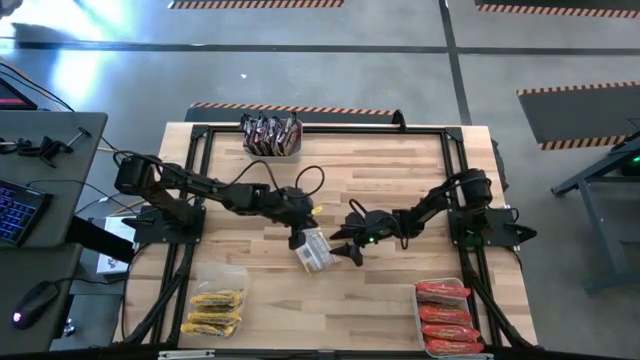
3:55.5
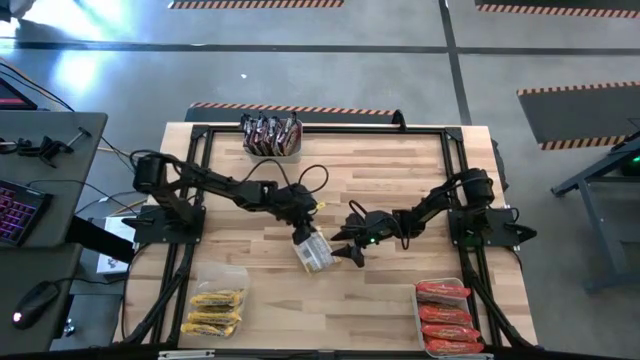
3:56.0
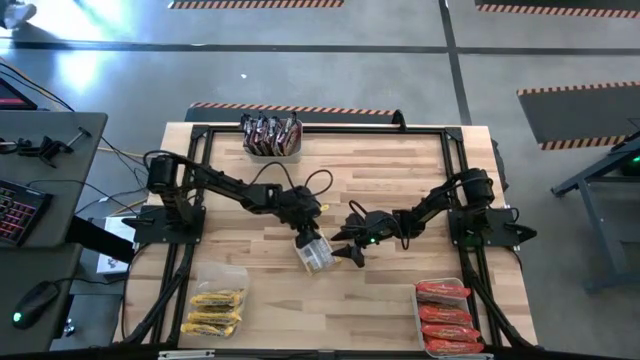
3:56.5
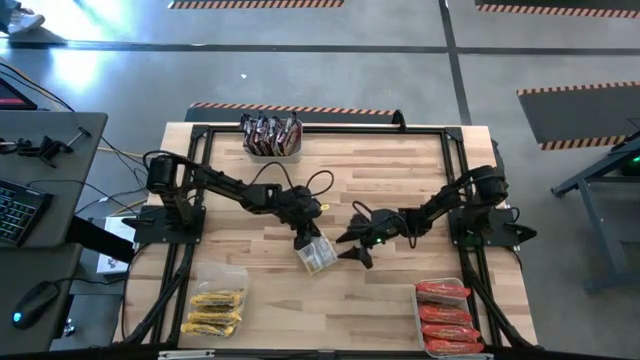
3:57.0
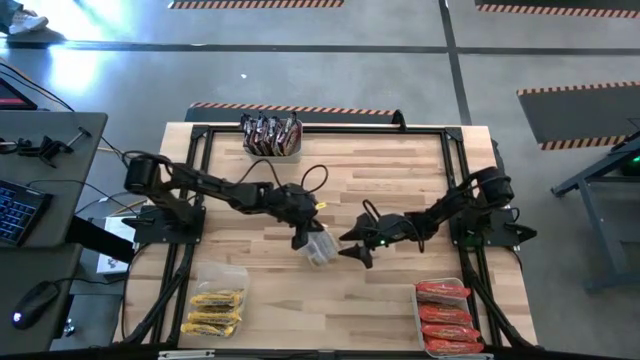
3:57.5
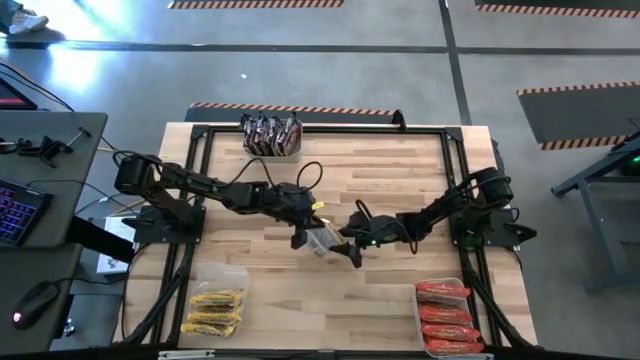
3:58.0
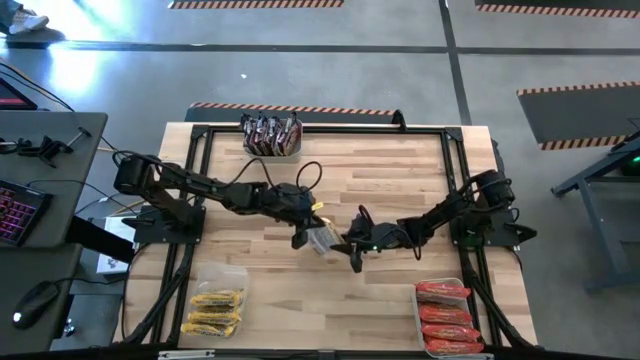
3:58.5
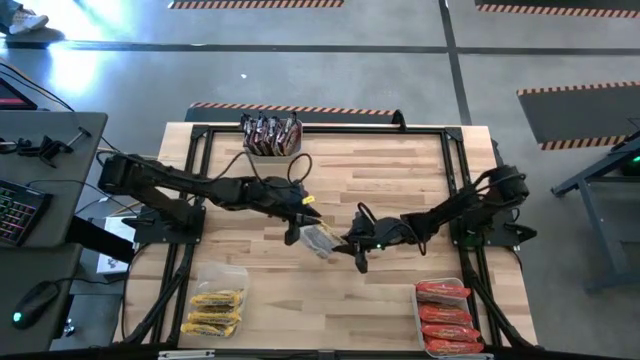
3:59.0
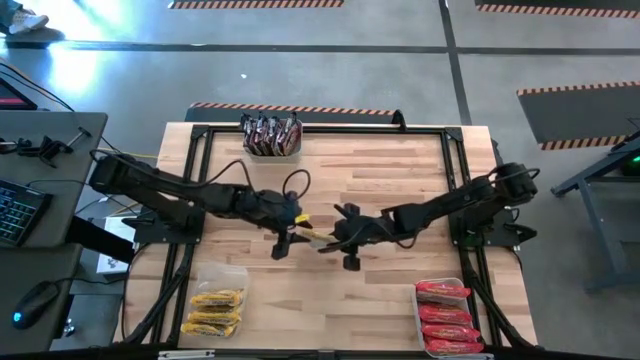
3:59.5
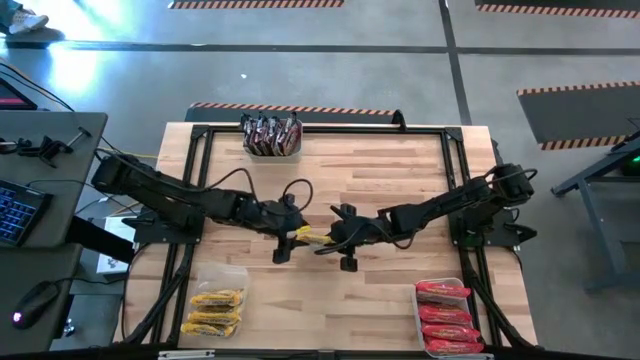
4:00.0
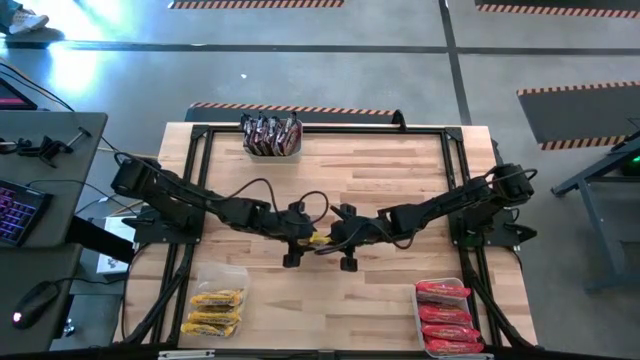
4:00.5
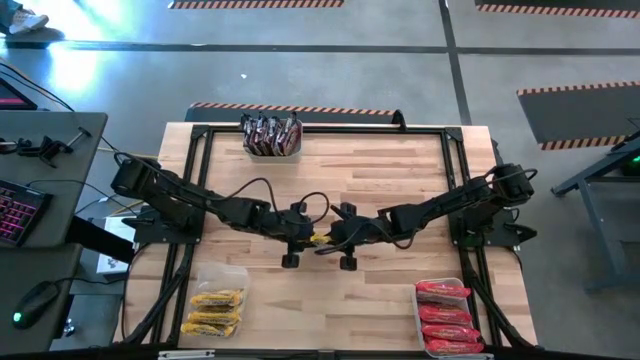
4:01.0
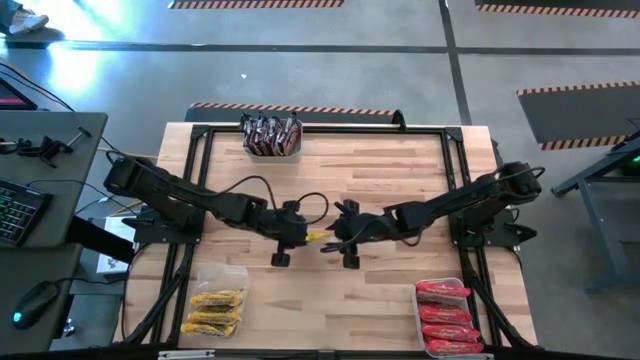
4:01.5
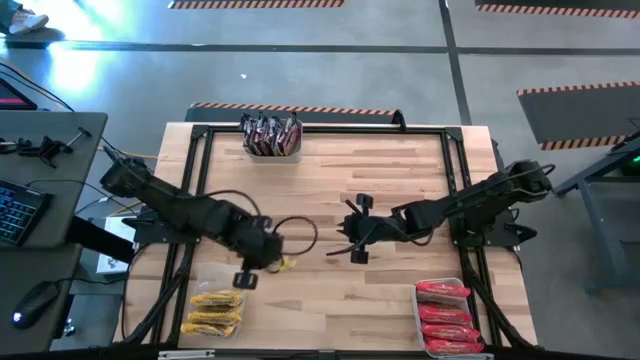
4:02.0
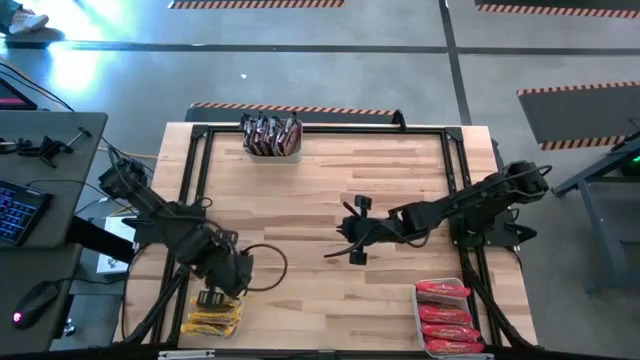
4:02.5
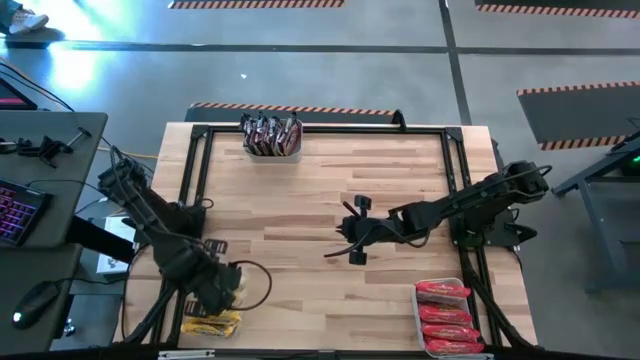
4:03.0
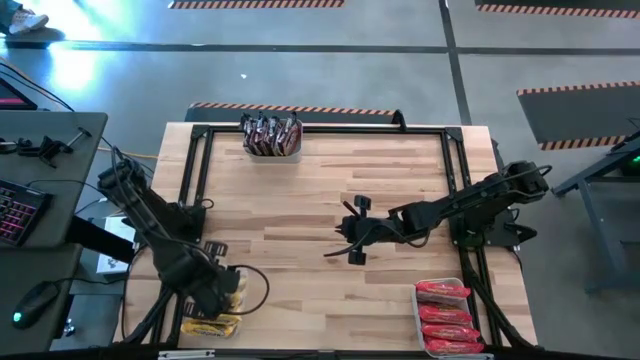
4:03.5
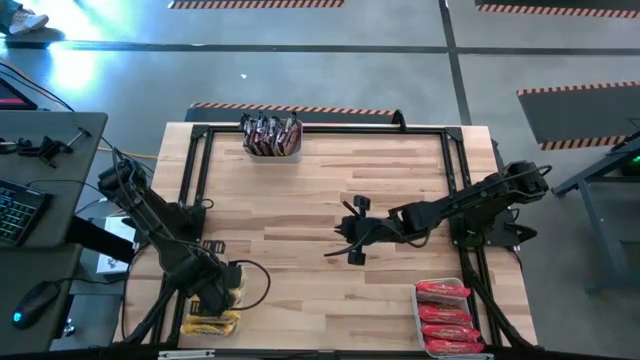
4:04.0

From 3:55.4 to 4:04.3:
Task: Sort Maruchan noodles
Put the yellow noodle pack into the transparent bin

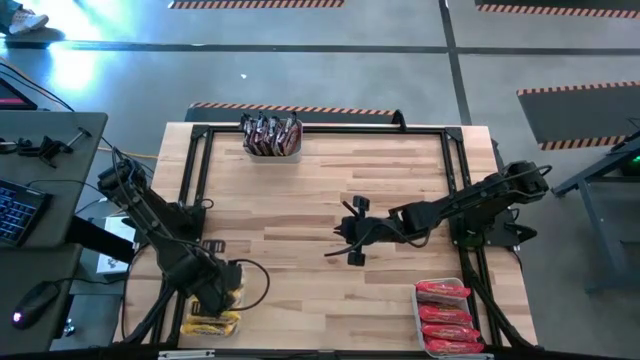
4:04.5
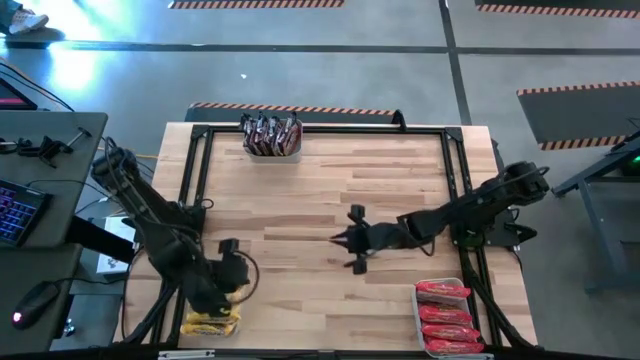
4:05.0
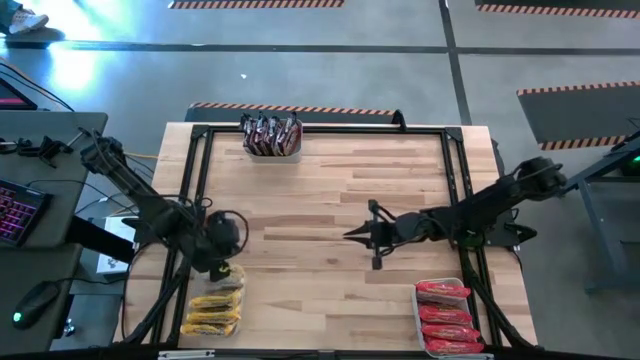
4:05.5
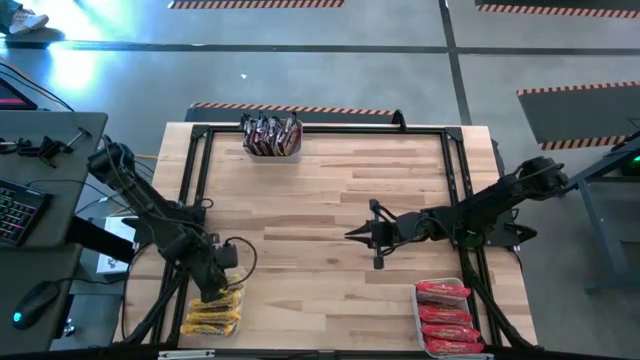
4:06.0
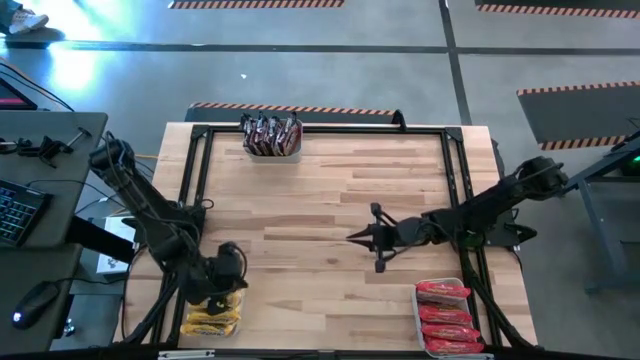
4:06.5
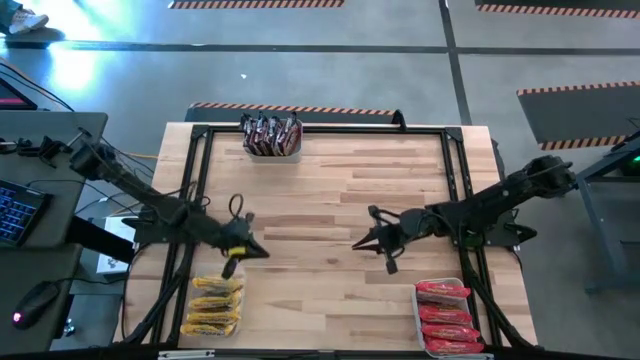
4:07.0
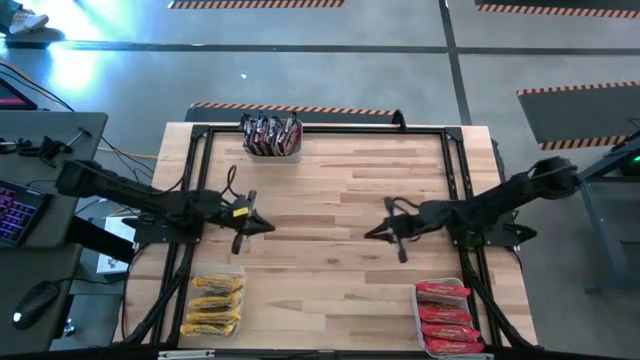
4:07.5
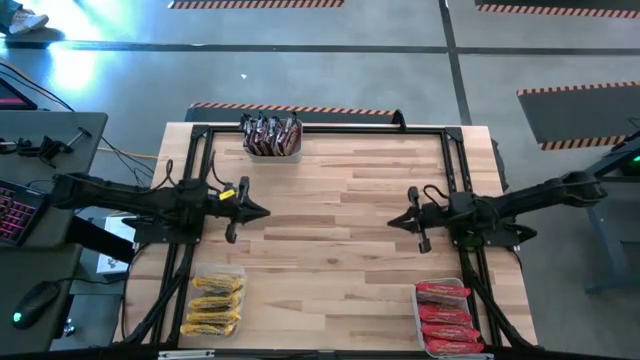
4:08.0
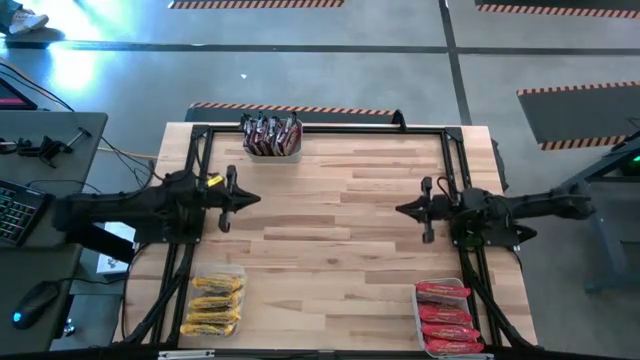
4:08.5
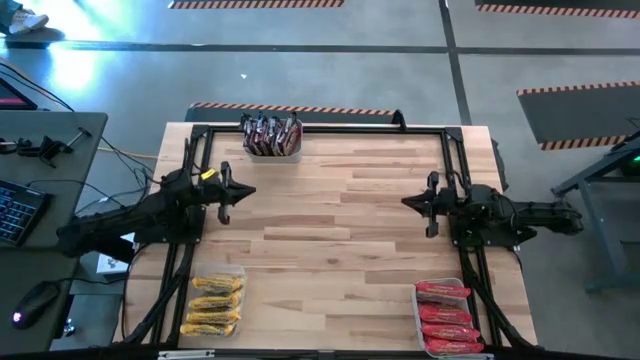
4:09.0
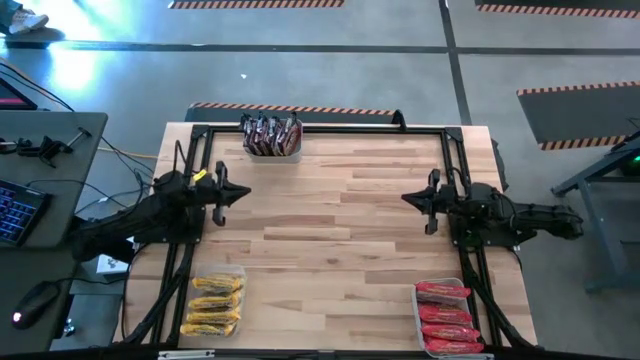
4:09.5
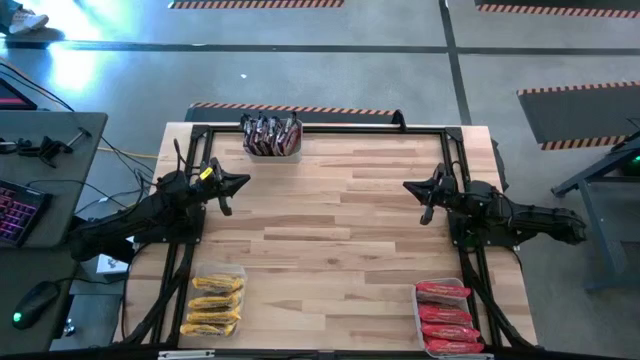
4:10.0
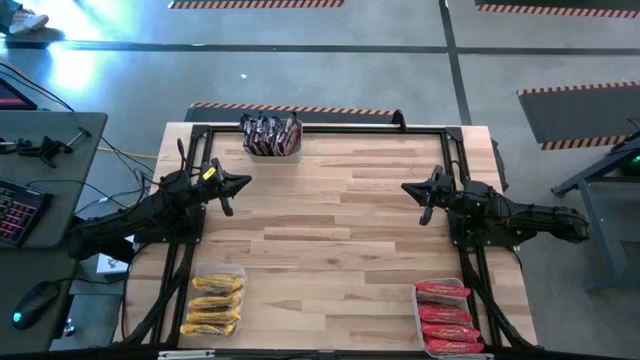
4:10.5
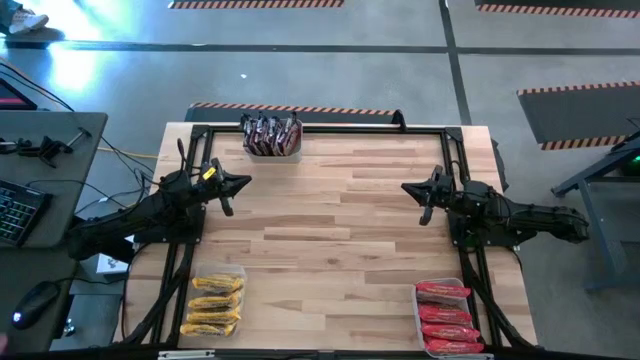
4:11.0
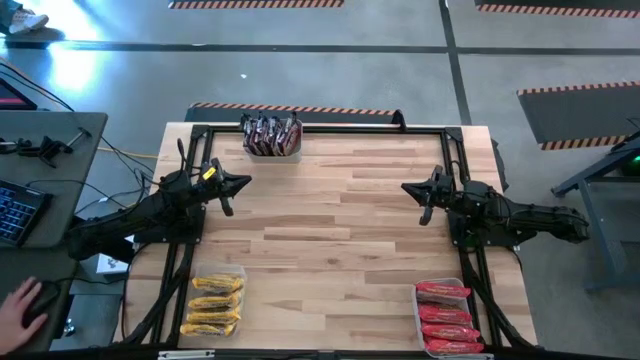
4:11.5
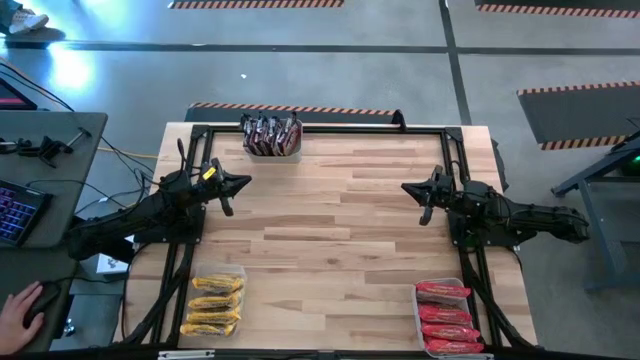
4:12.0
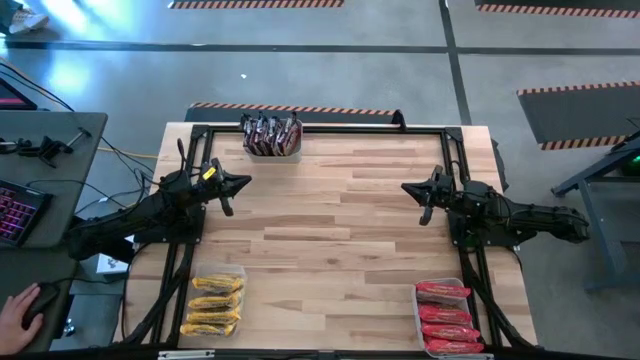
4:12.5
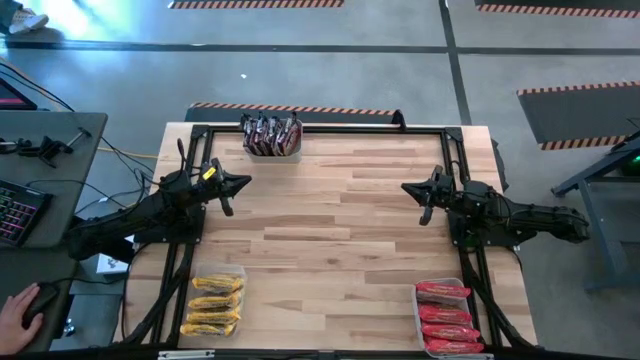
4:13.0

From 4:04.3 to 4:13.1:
Return to Home position

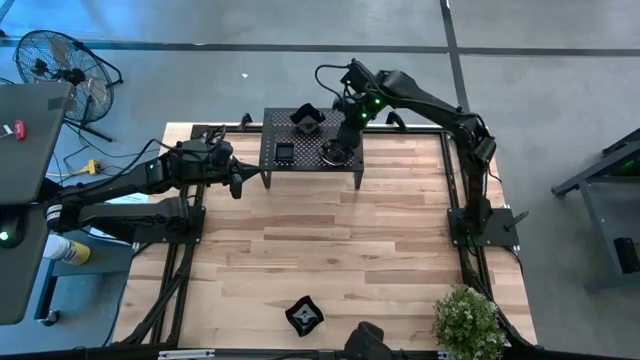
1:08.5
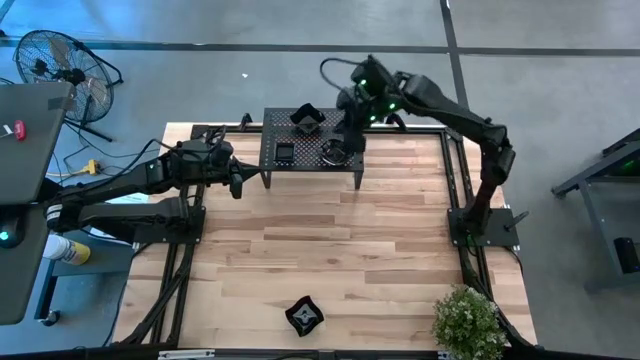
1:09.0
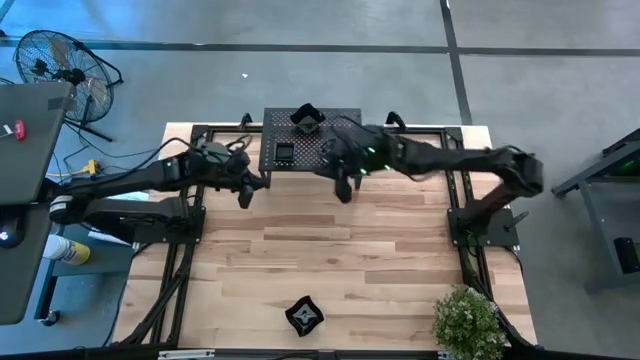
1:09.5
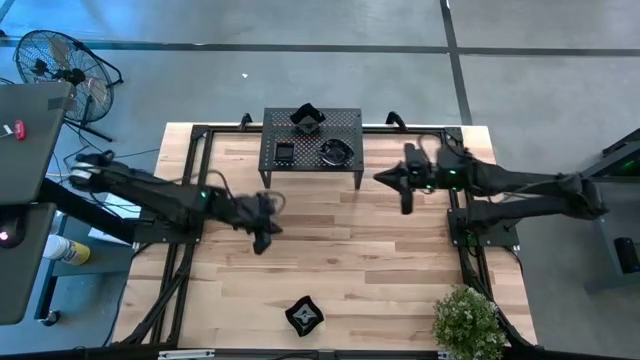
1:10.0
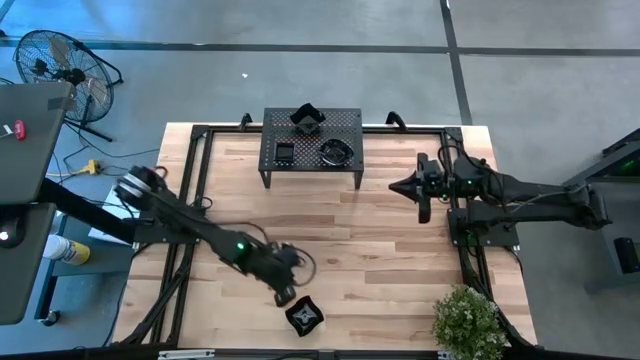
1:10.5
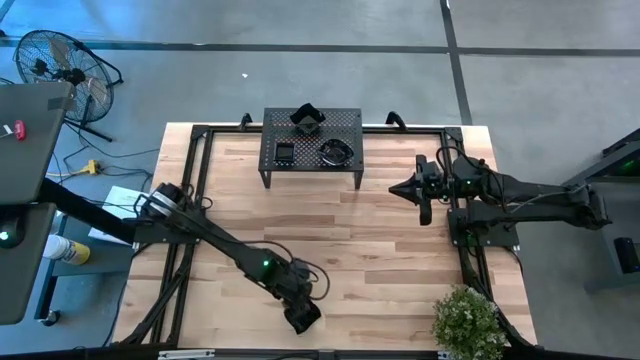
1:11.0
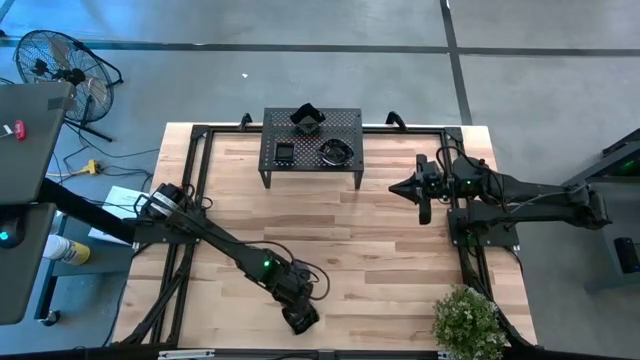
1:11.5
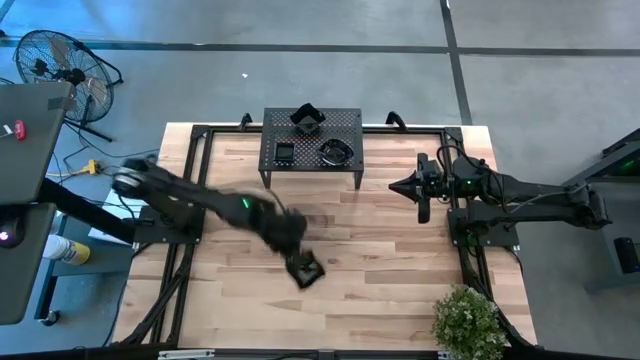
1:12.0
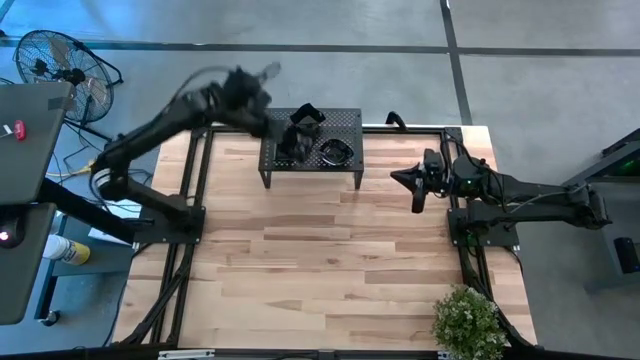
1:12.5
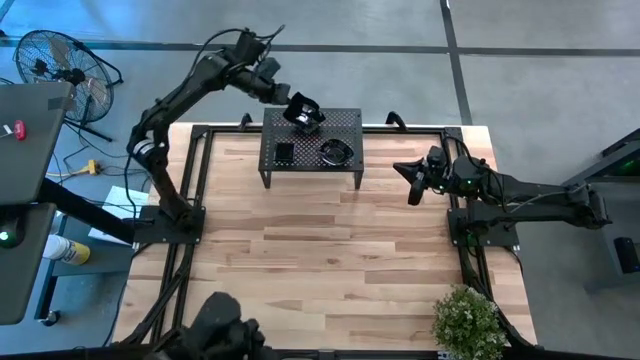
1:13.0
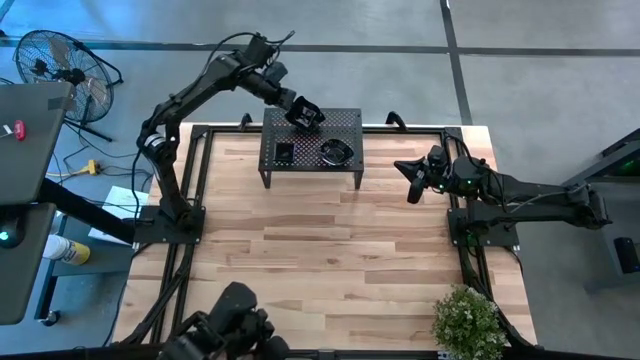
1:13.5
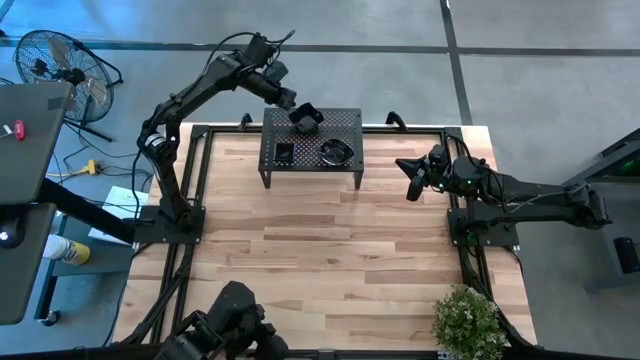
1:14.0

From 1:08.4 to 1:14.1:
Task: Pick & Place Mini shaped plates
Stack the black distorted shaped plate on top of the black distorted shaped plate on the shelf
